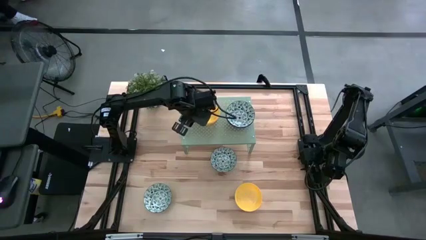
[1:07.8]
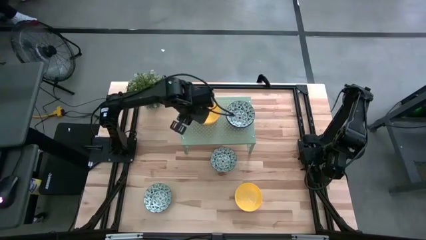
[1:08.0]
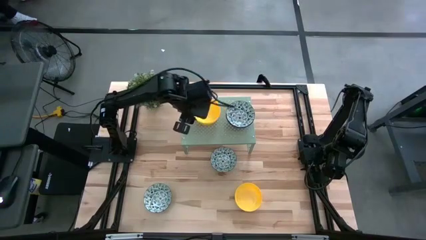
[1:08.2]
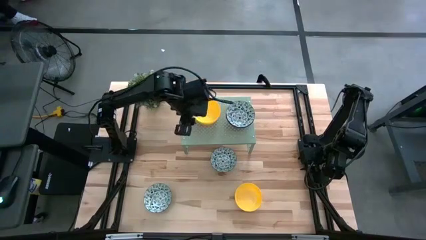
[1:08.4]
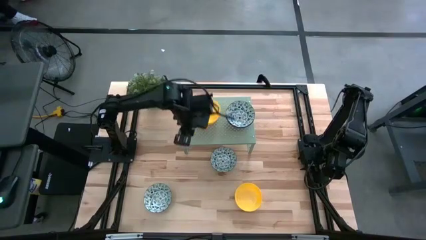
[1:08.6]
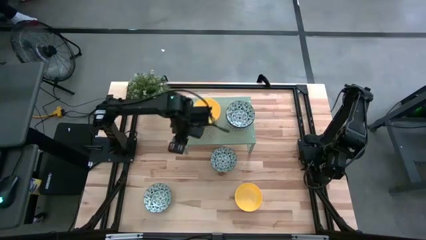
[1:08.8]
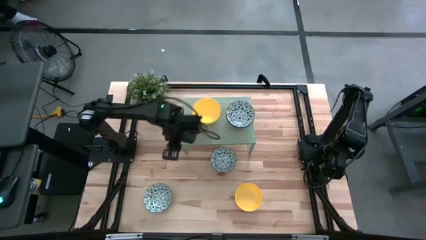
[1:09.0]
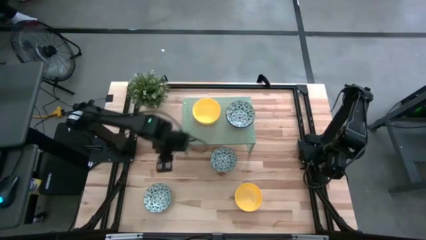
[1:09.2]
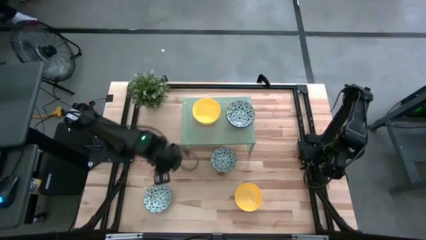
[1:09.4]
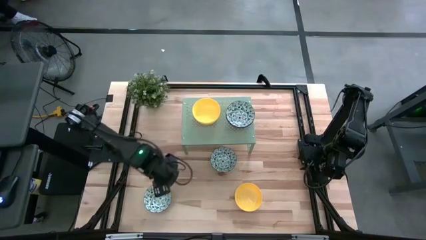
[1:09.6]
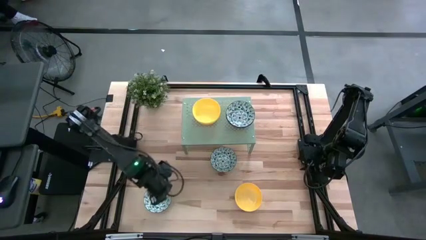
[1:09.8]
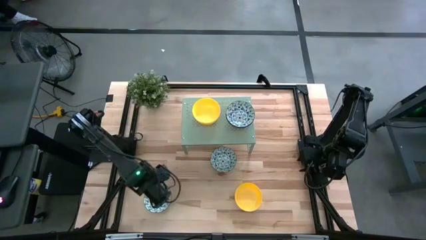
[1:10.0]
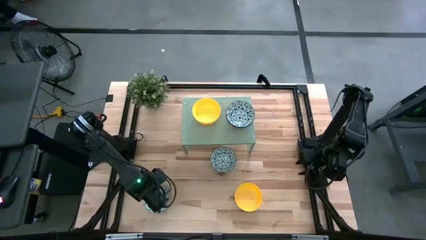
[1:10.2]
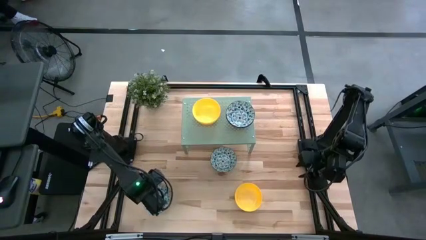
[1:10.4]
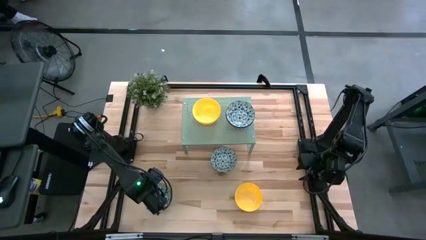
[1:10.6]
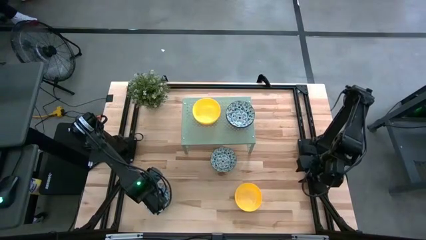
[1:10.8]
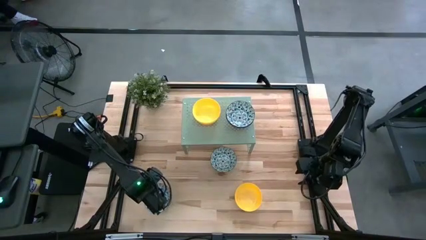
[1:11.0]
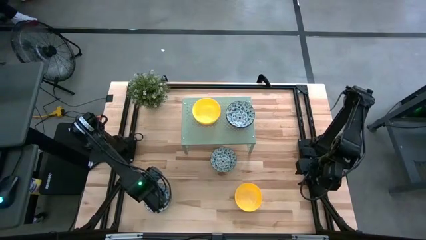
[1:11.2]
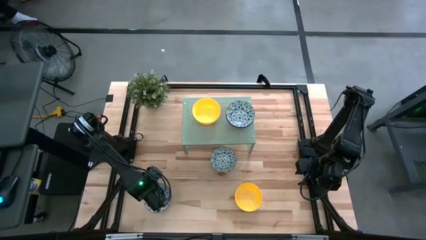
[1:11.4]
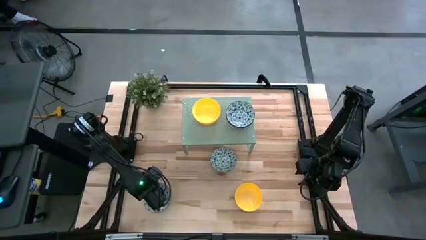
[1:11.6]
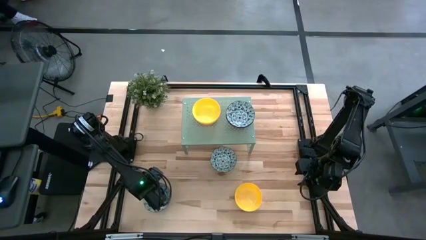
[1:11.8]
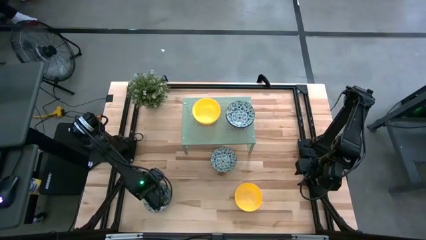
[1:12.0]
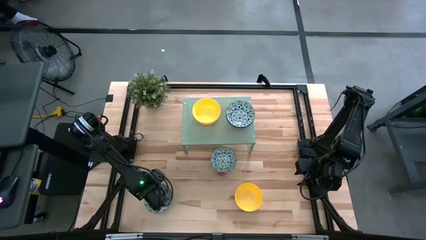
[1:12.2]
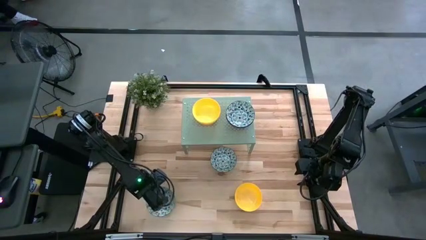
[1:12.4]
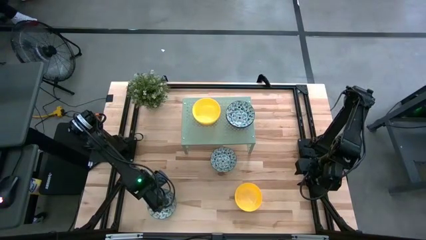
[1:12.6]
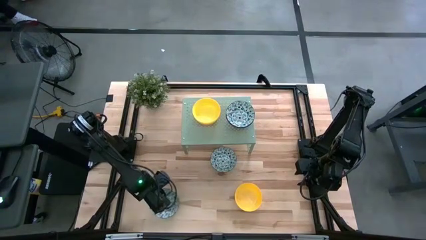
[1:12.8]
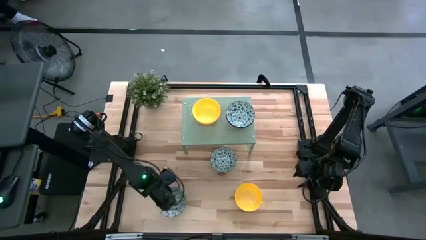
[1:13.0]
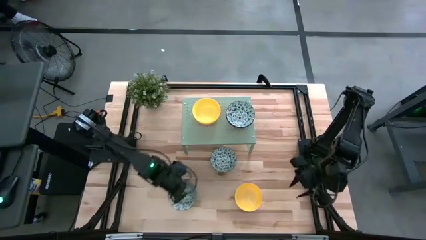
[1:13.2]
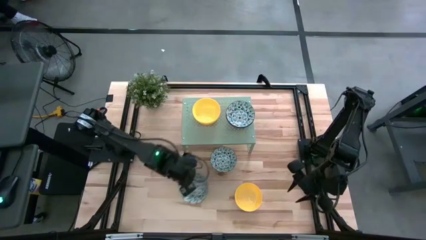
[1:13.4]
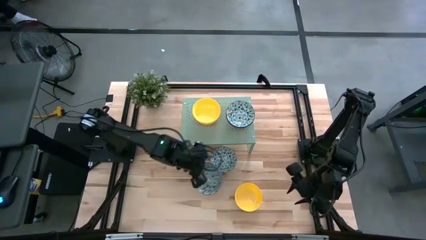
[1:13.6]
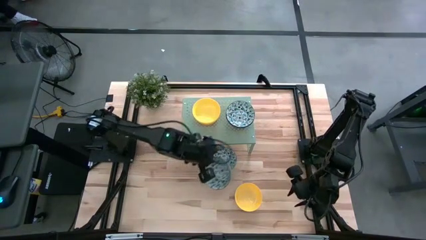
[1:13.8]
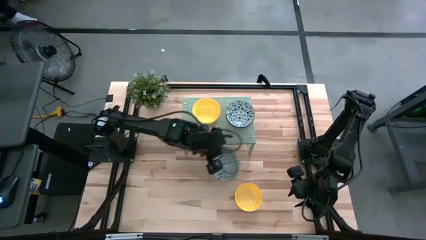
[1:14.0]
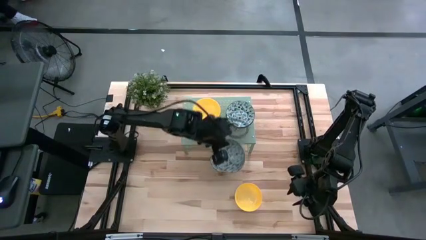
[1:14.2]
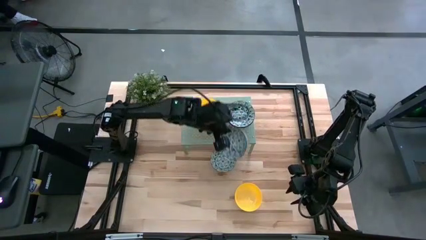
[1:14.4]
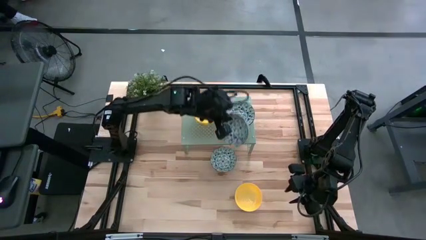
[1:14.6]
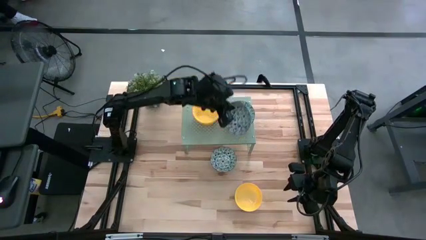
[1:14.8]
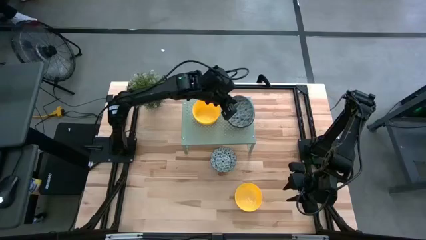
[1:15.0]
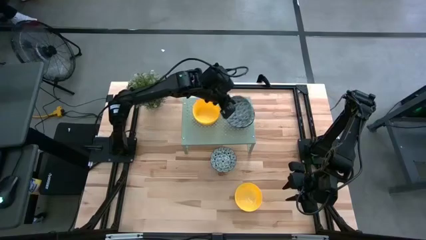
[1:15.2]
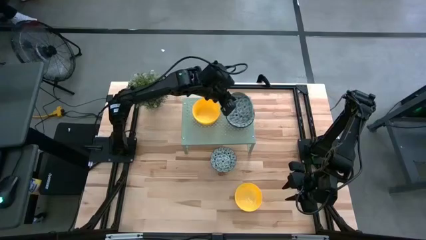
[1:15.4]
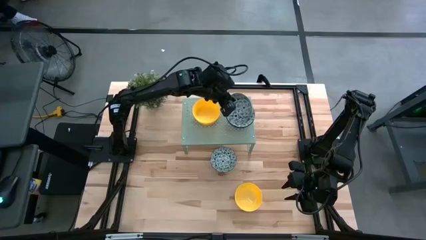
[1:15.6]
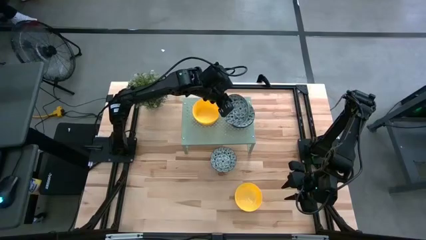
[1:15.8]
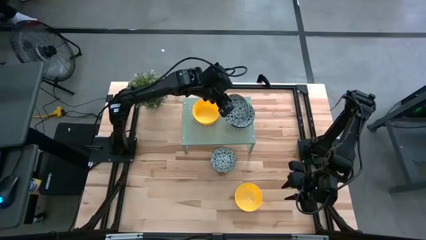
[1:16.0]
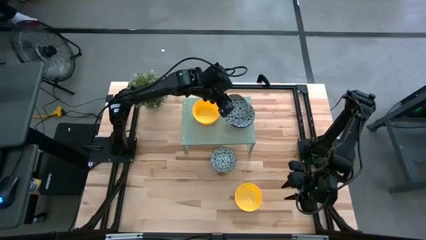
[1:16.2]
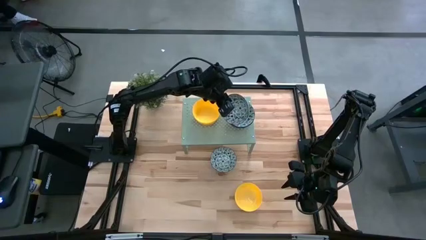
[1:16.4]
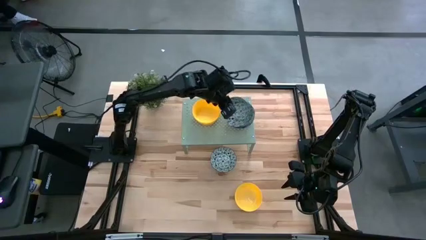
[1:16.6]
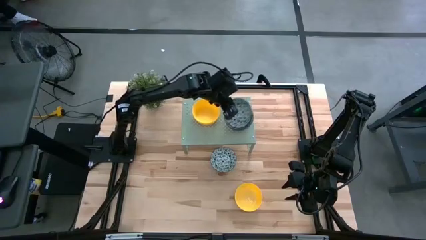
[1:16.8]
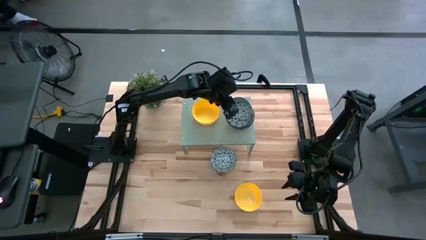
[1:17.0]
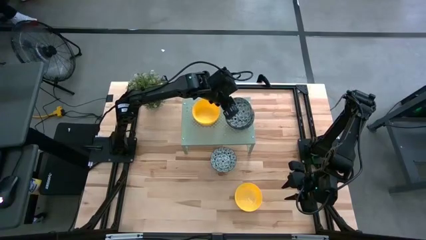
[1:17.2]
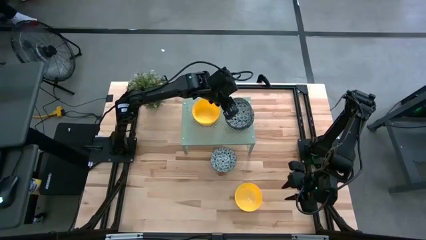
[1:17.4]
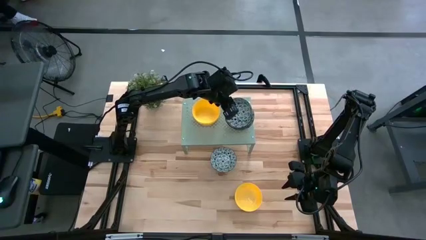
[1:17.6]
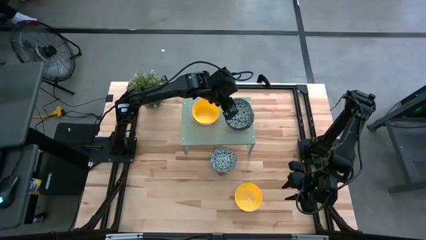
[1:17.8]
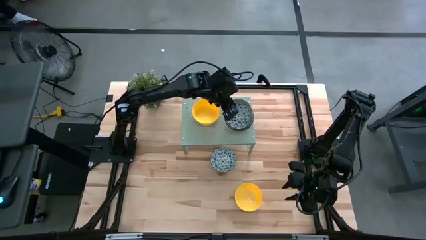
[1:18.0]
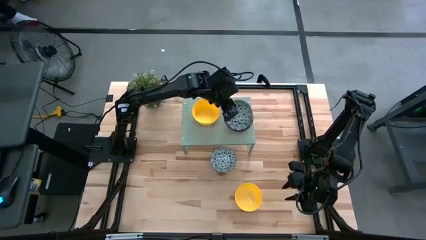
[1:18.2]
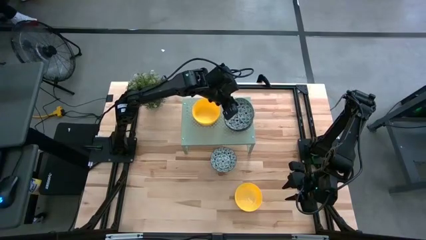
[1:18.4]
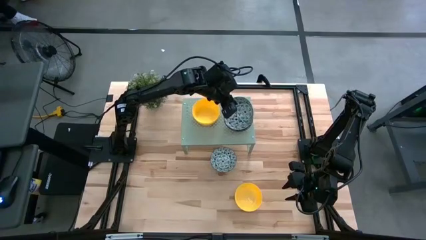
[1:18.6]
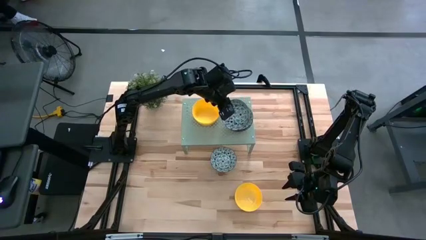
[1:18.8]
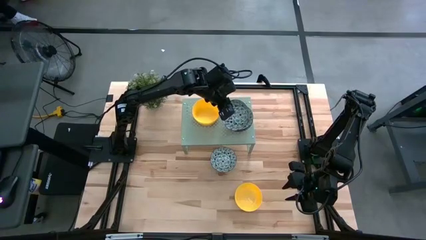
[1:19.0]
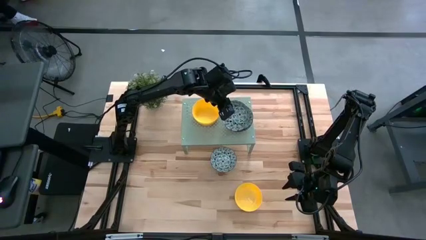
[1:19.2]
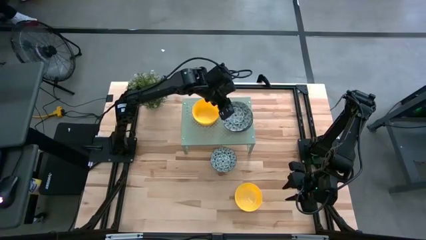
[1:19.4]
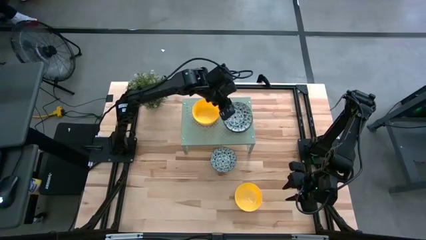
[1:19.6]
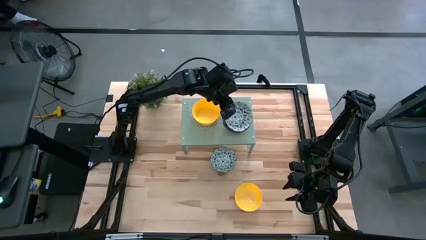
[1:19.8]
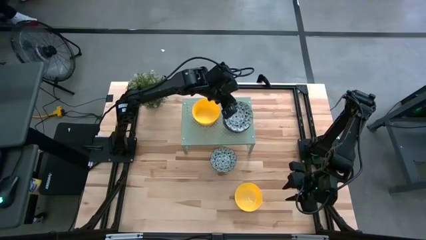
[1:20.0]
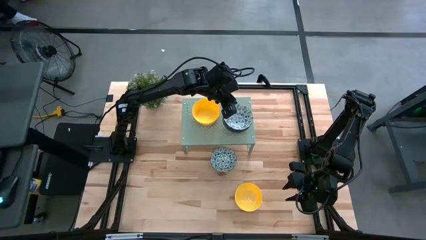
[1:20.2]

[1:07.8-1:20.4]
Task: Pick & Place Mini bowls
Stack the bottom left green patterned bowl on top of the green patterned bowl on the shelf

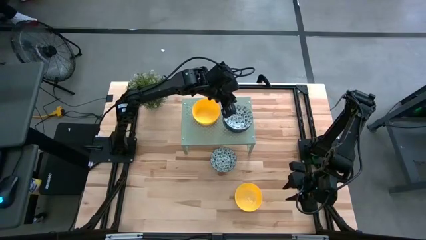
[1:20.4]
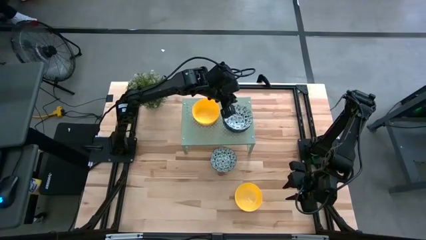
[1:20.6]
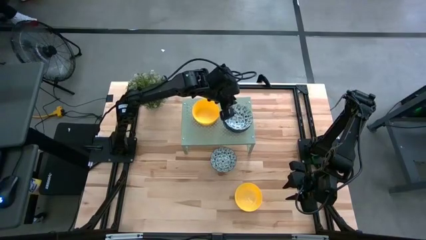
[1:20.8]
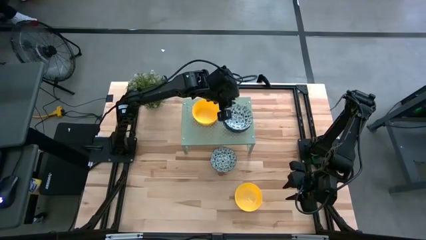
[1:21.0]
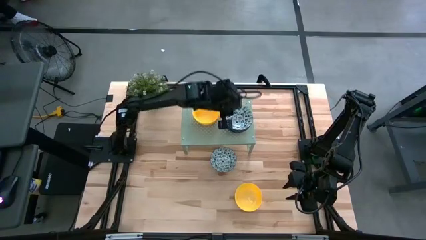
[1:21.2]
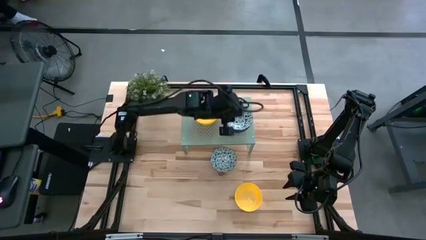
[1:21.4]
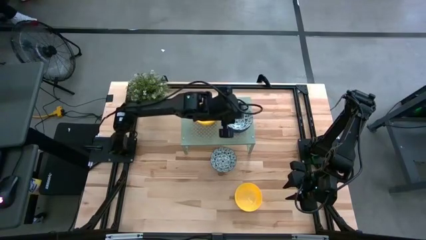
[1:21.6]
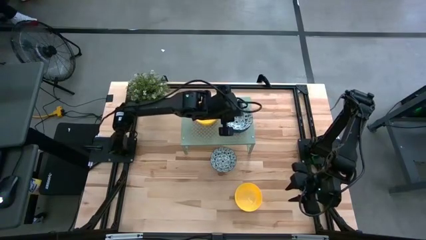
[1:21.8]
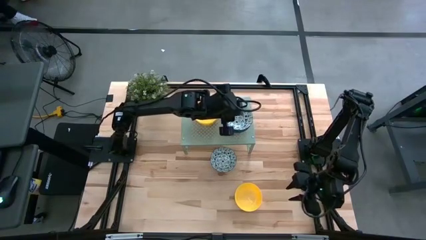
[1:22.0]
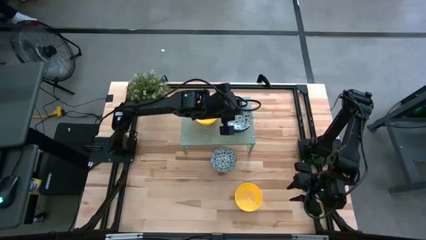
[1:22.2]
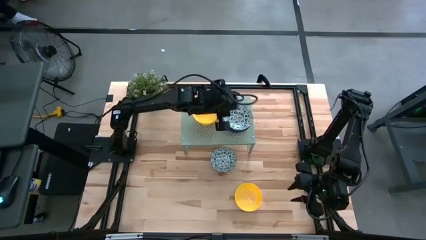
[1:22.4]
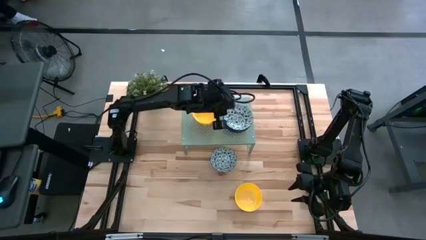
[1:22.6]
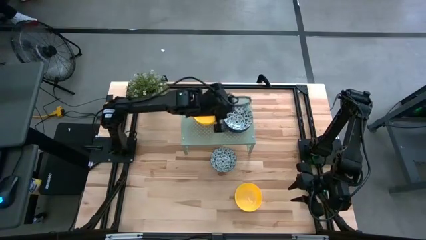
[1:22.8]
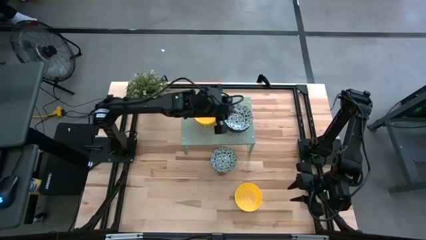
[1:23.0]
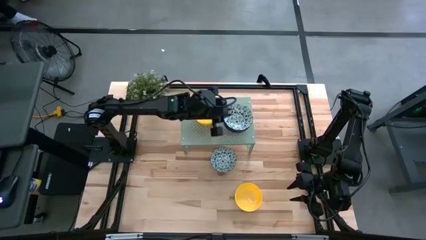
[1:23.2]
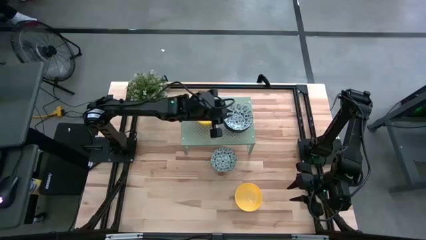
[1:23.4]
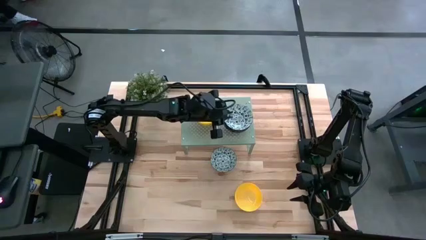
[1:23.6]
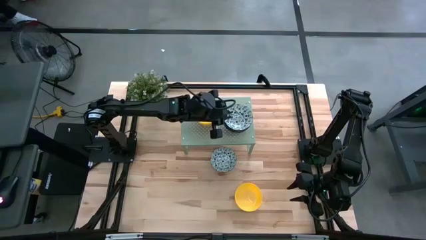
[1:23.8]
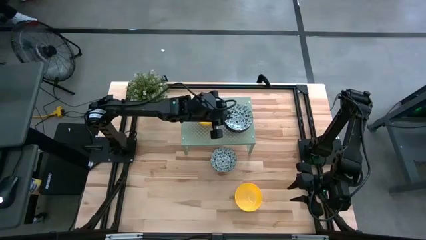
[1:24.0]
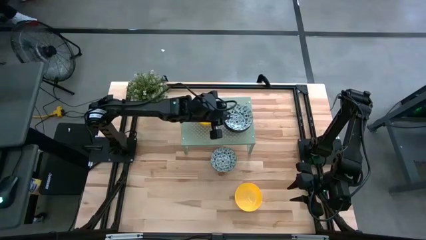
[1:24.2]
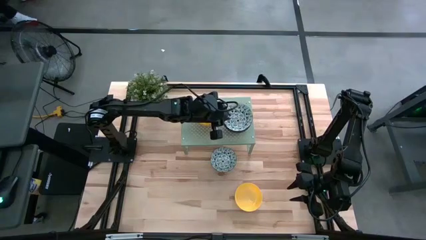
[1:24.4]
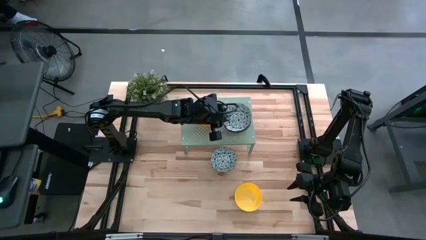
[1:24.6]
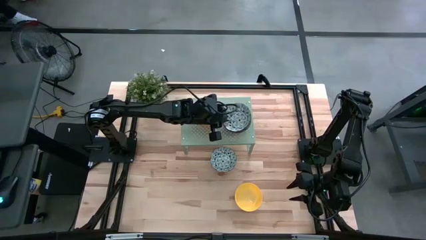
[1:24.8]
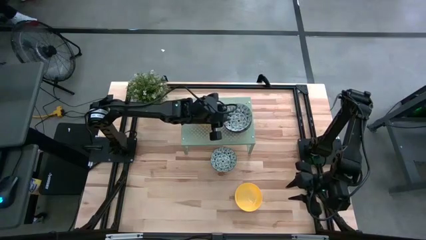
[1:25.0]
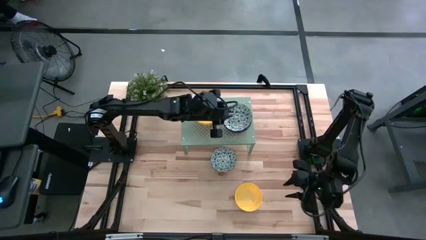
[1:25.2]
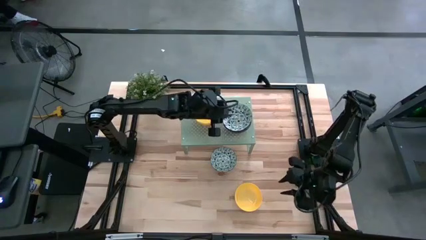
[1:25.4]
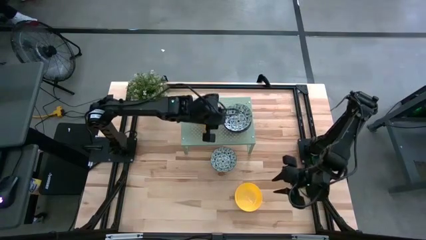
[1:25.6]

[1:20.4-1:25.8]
Adjust the green patterned bowl
